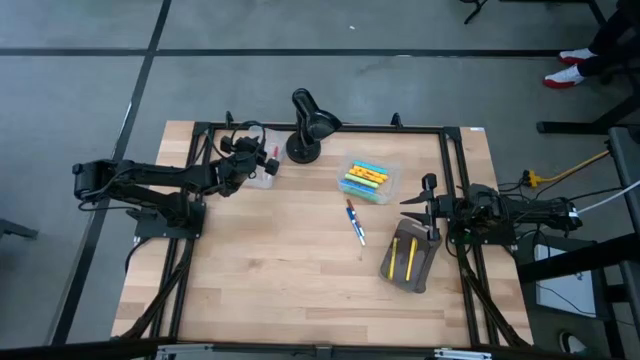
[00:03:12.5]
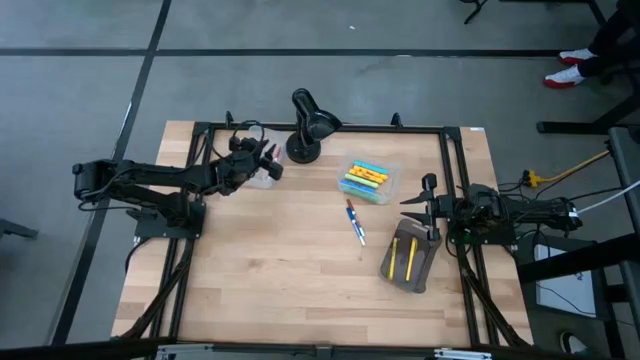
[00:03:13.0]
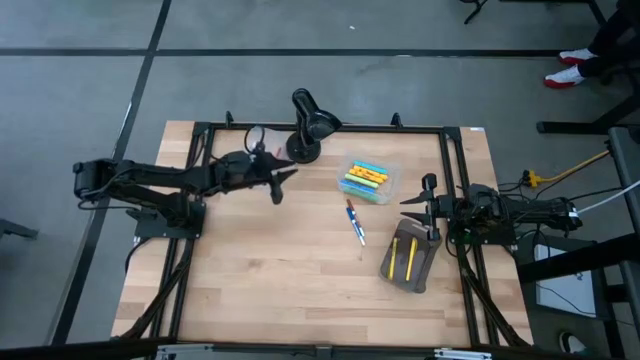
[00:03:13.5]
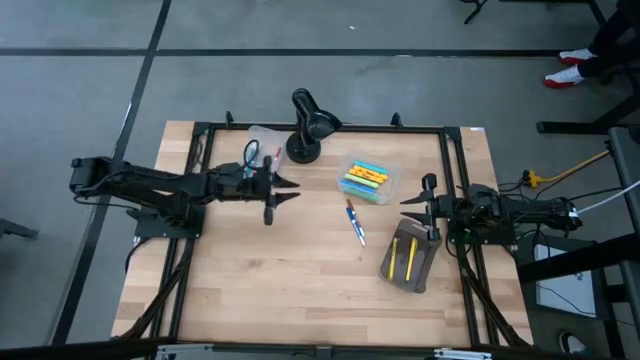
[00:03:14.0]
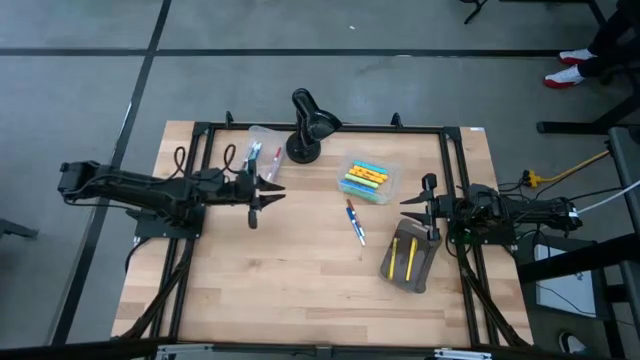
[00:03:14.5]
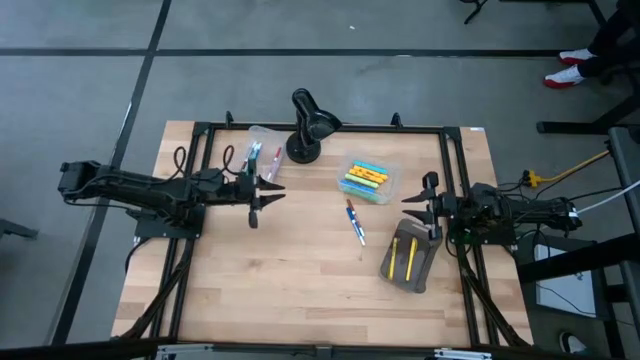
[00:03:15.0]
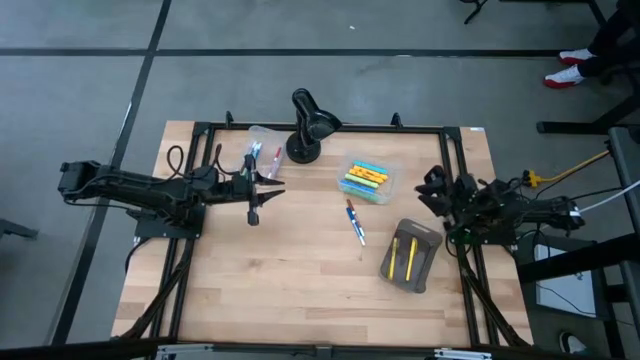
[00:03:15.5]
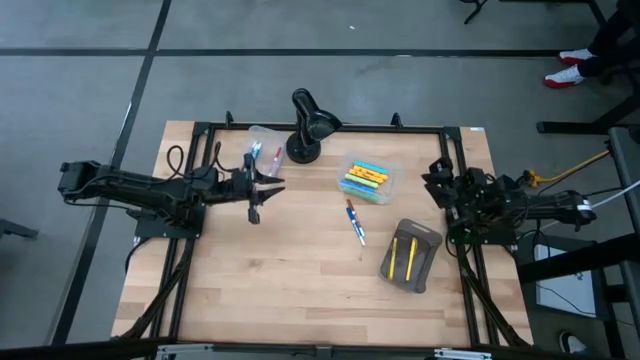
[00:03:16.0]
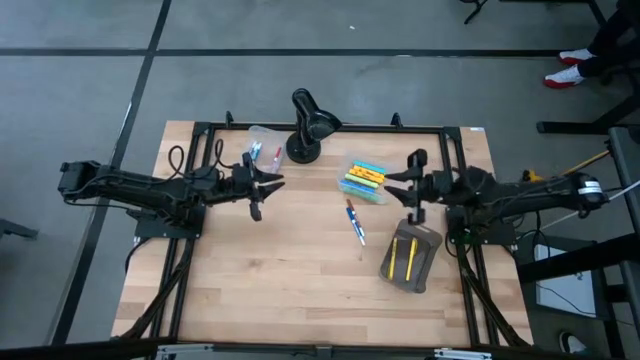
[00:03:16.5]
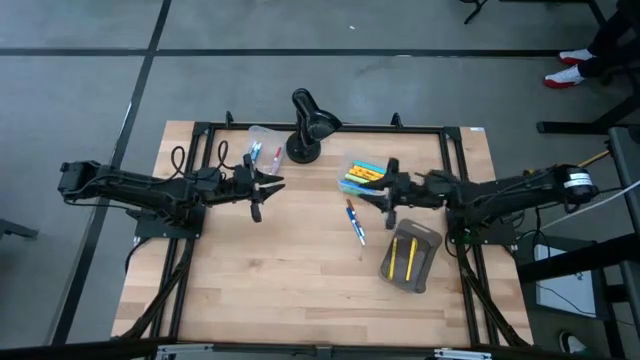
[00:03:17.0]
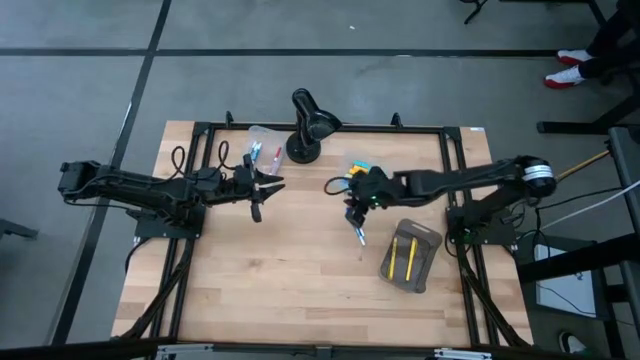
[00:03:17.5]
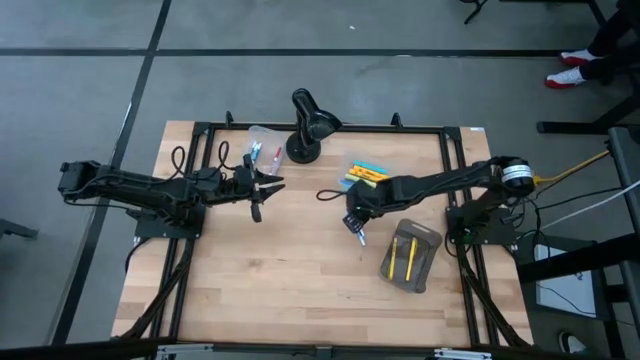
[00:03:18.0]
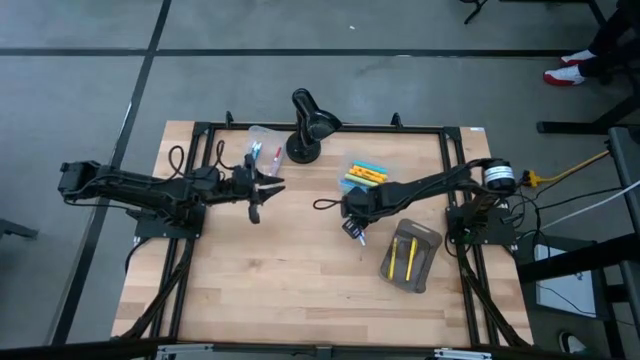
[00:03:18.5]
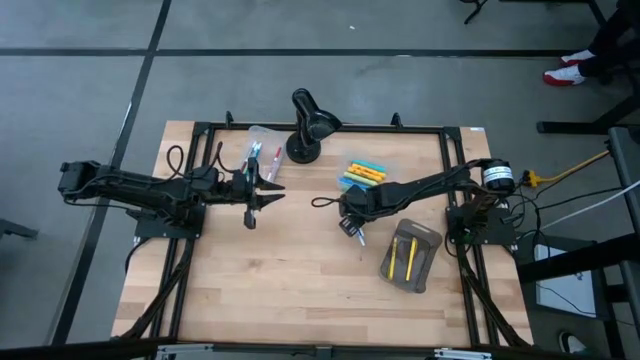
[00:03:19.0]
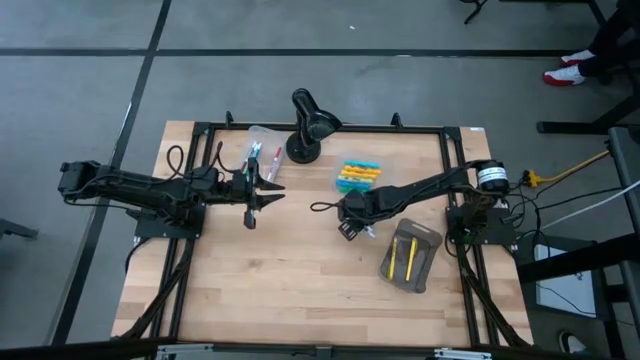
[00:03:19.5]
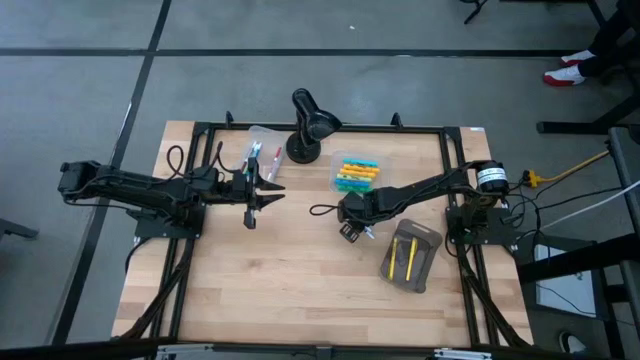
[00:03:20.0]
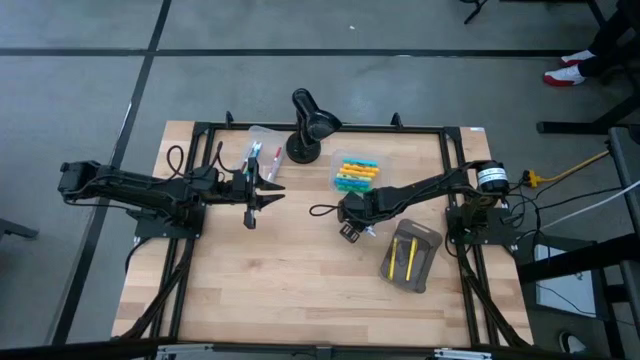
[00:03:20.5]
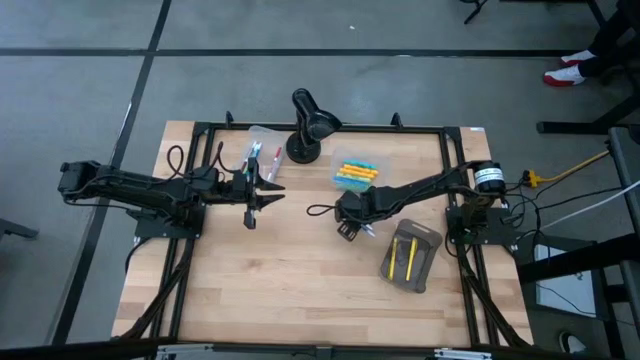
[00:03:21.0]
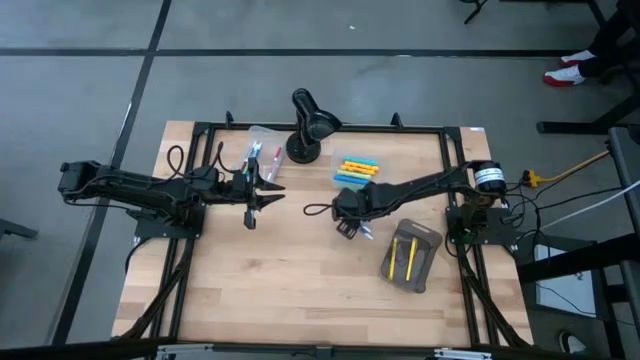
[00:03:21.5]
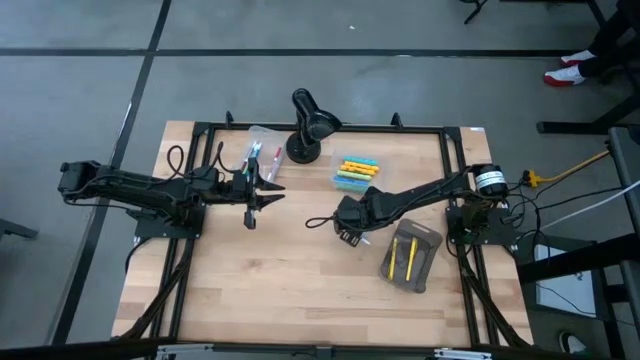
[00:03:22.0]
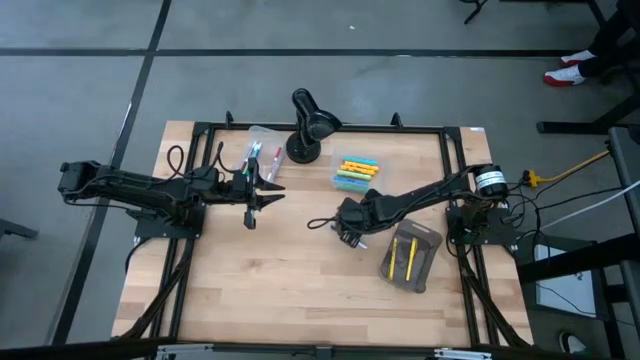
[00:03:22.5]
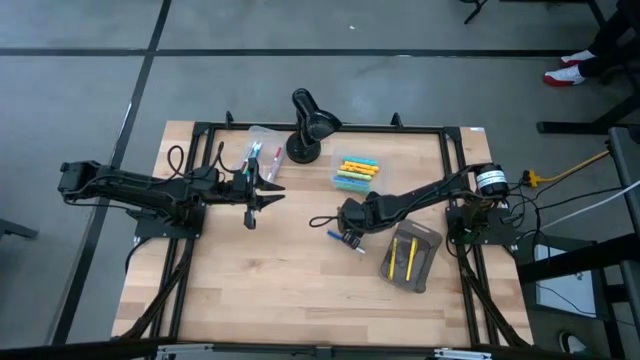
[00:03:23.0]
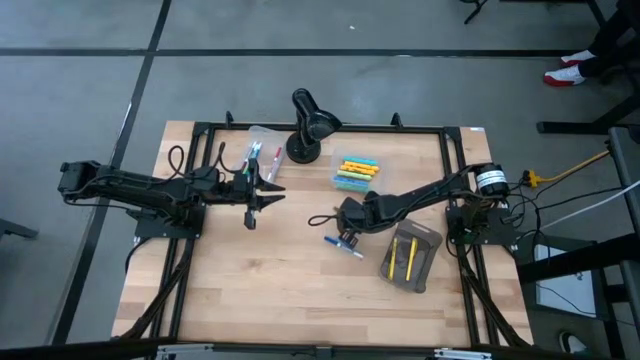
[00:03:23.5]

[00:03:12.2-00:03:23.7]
Task: Pick & Place Markers
Put the brown marker pen into the left transparent bin

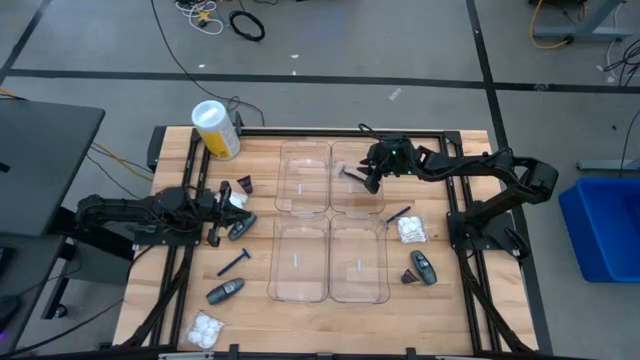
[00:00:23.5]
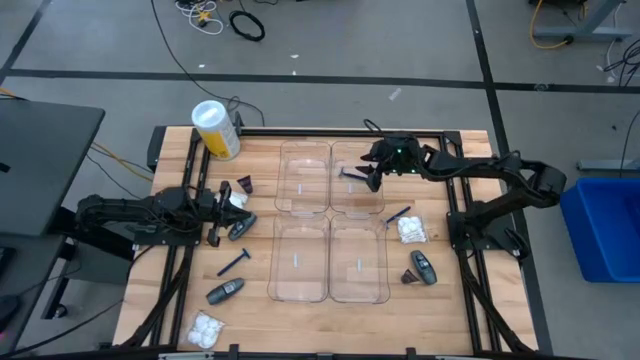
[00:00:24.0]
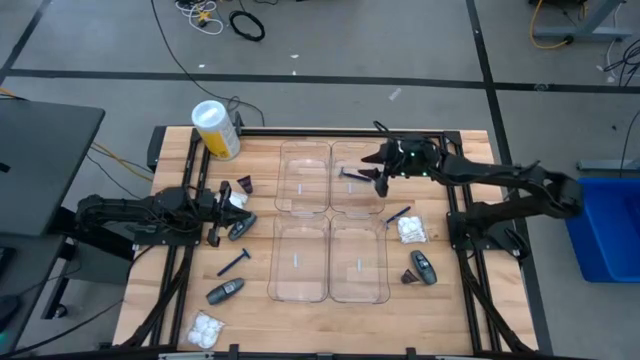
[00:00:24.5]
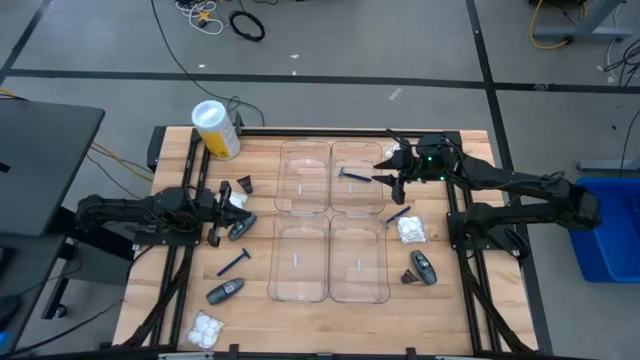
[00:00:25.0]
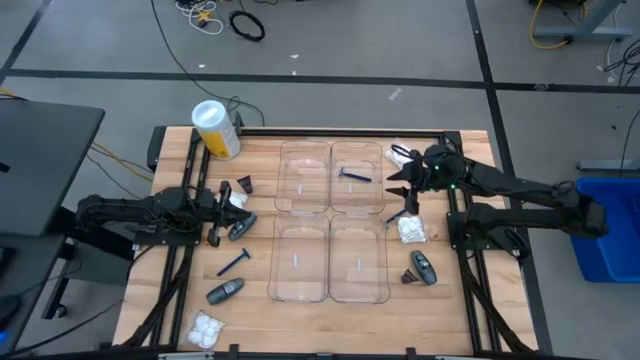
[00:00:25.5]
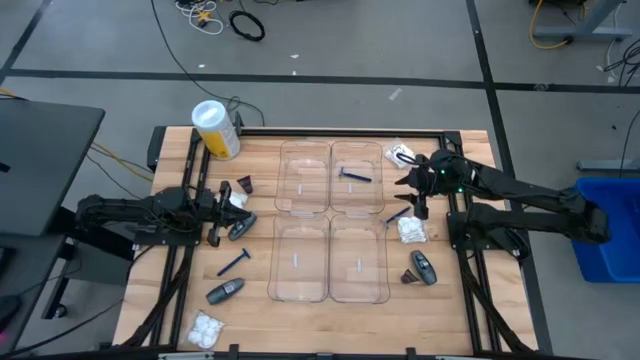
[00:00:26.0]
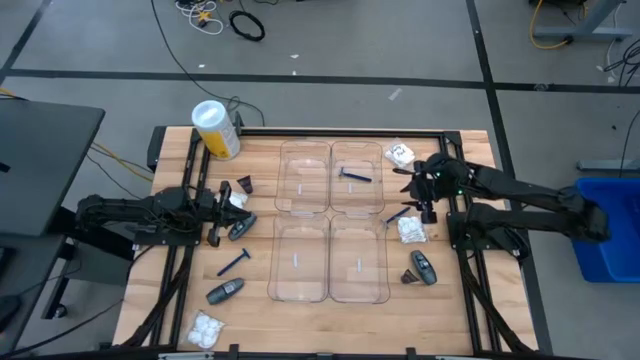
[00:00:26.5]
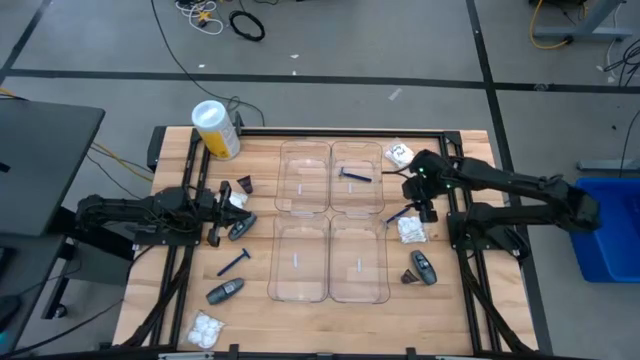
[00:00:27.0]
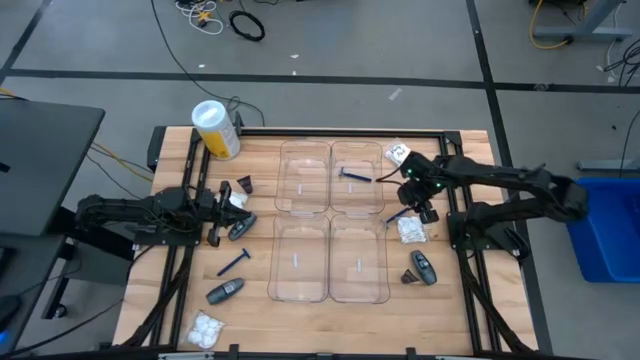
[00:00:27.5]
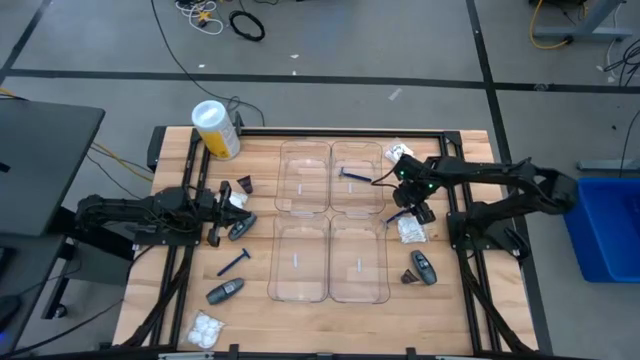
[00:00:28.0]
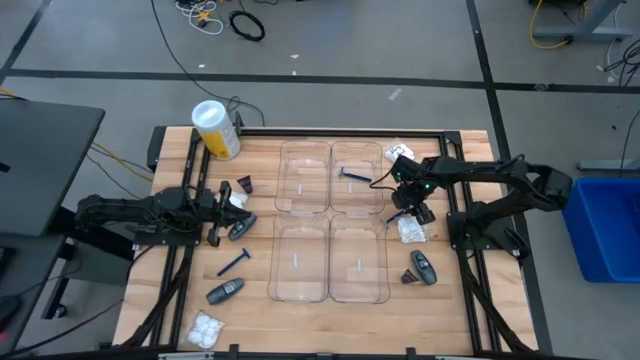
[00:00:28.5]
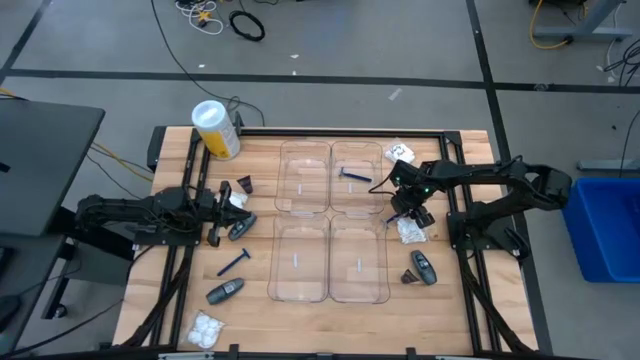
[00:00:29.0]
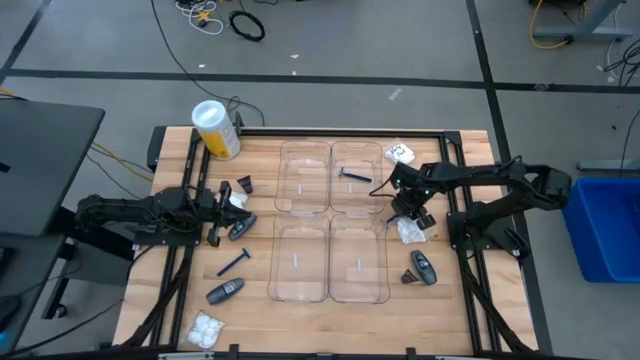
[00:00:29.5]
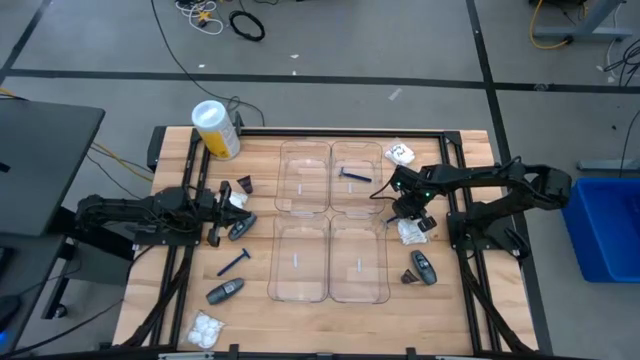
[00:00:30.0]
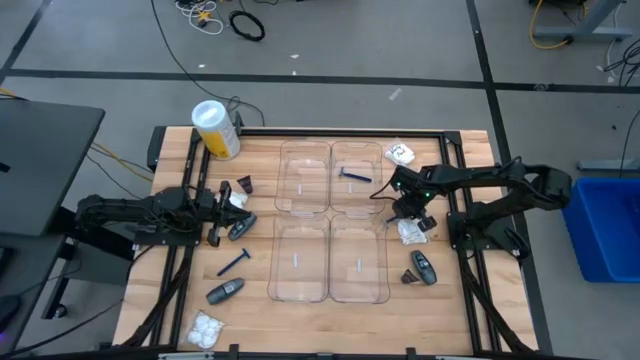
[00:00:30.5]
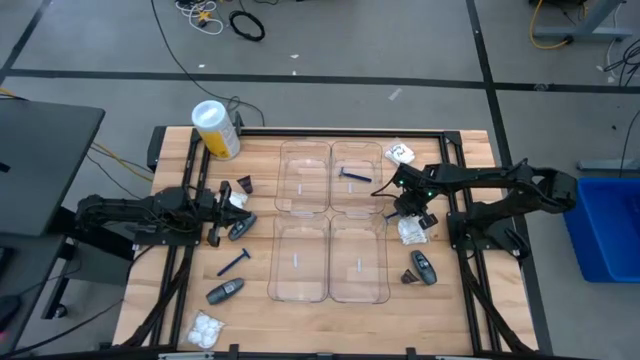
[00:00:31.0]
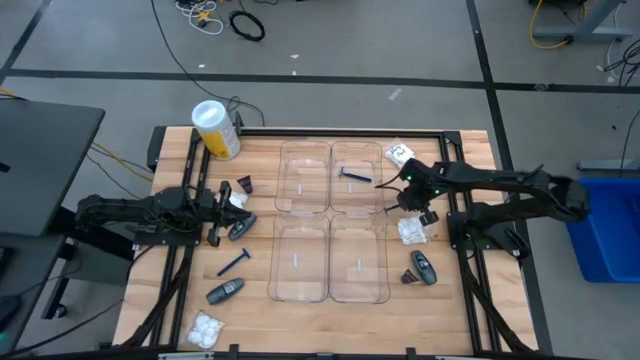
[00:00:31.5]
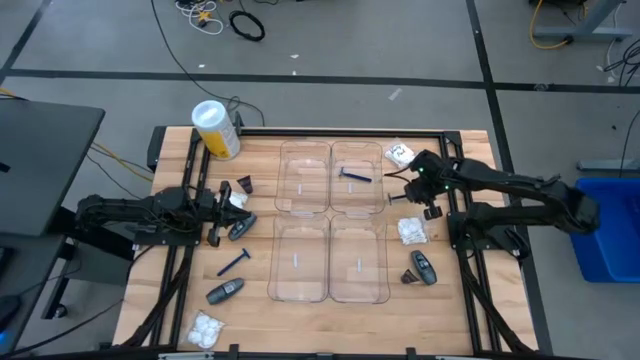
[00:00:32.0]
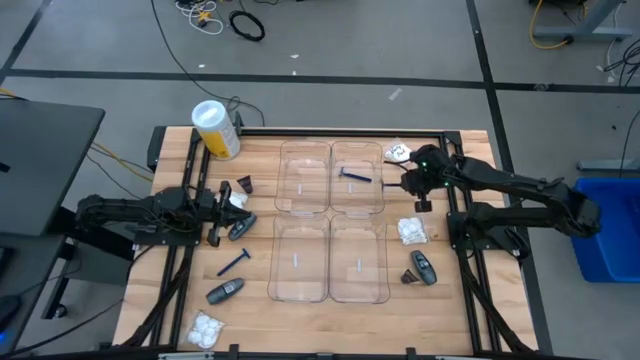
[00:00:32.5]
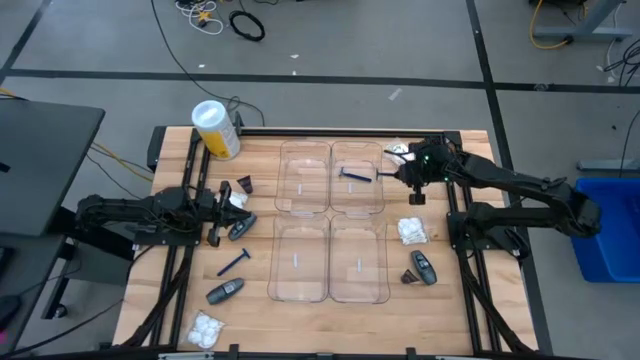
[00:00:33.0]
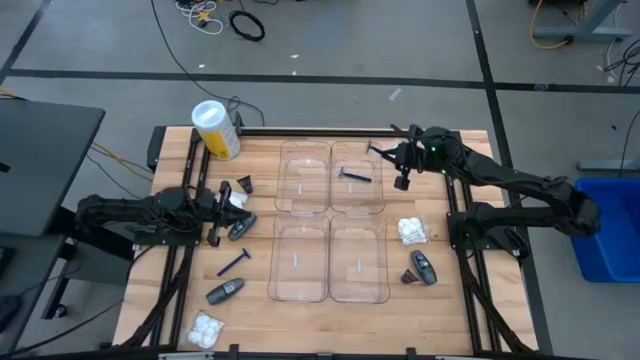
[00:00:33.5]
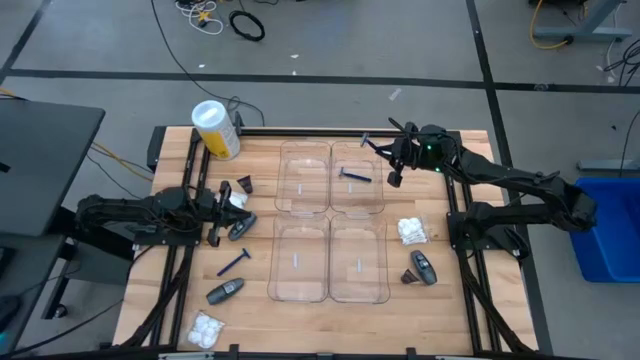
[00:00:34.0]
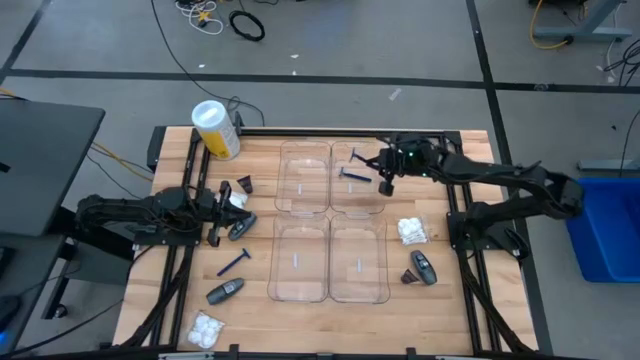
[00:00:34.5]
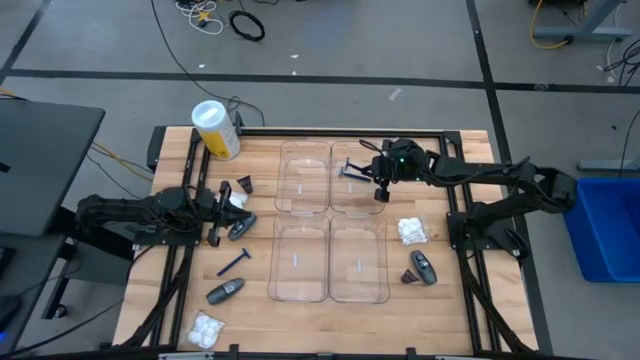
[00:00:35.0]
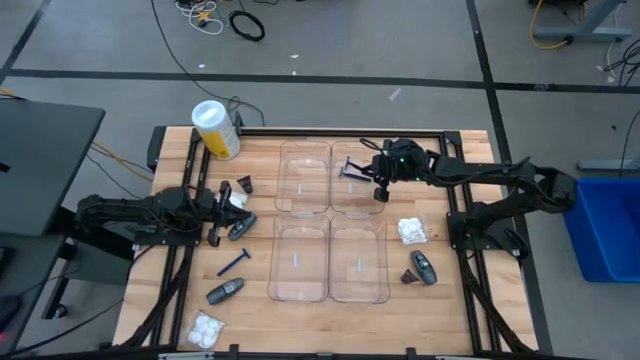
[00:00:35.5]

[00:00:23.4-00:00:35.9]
Task: Pick & Place Travel size toiletries
Put the right razor into the top right transparent bin
